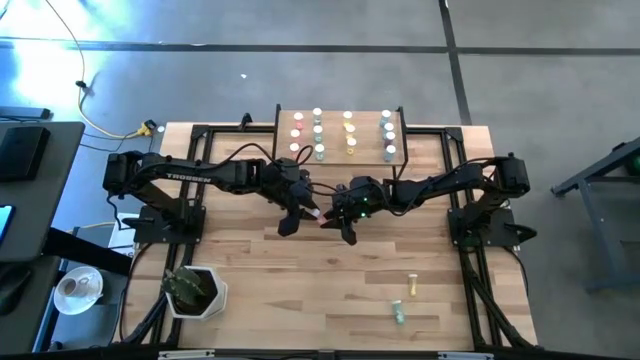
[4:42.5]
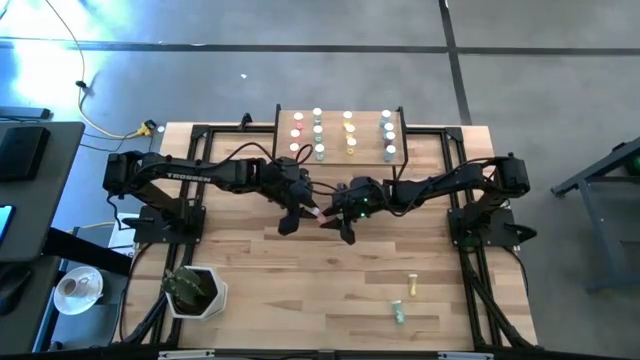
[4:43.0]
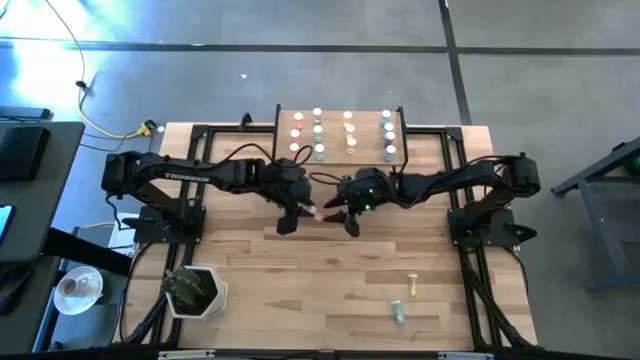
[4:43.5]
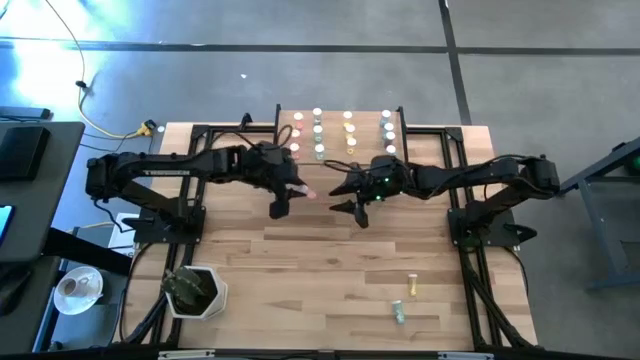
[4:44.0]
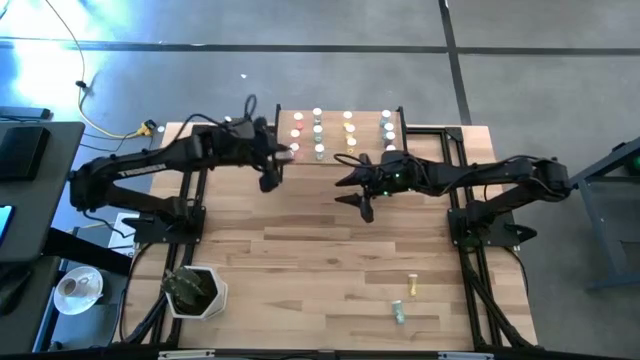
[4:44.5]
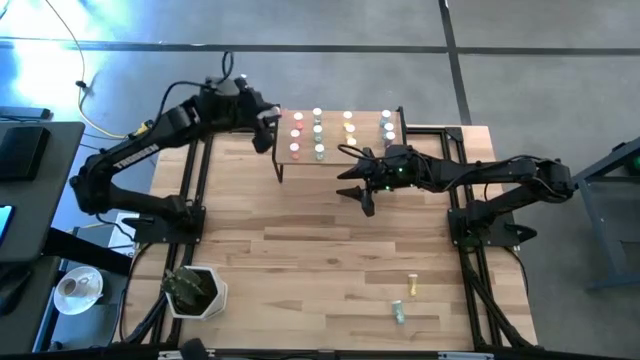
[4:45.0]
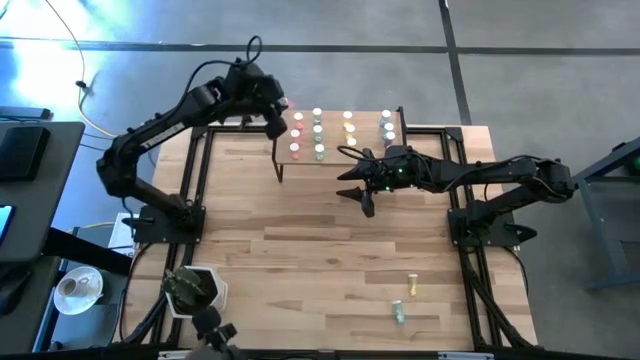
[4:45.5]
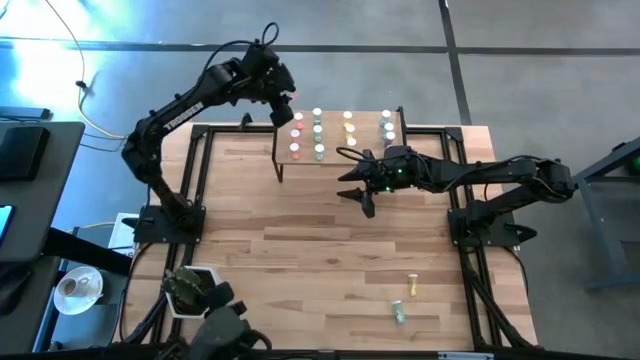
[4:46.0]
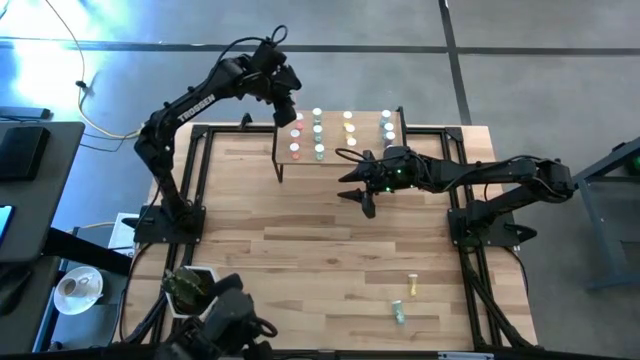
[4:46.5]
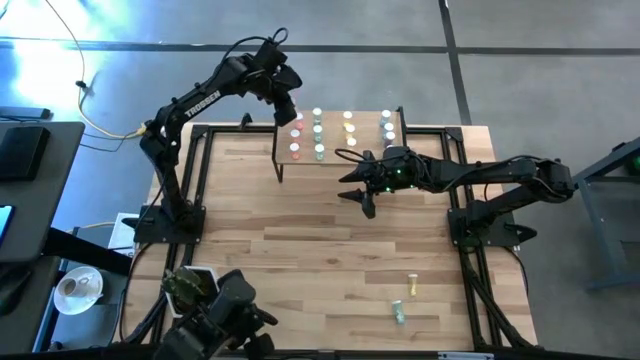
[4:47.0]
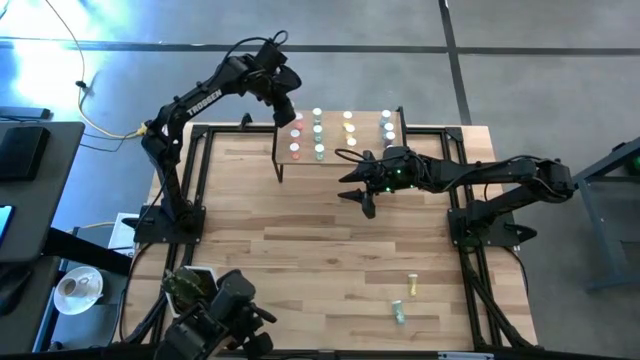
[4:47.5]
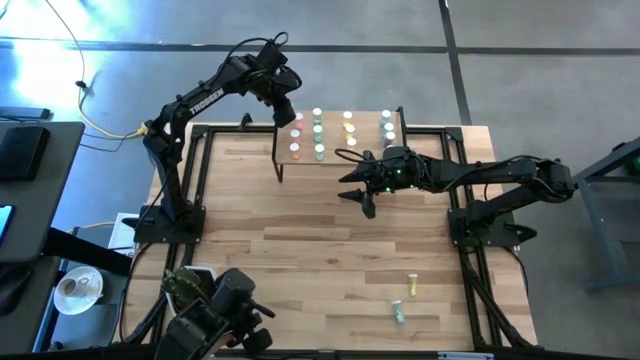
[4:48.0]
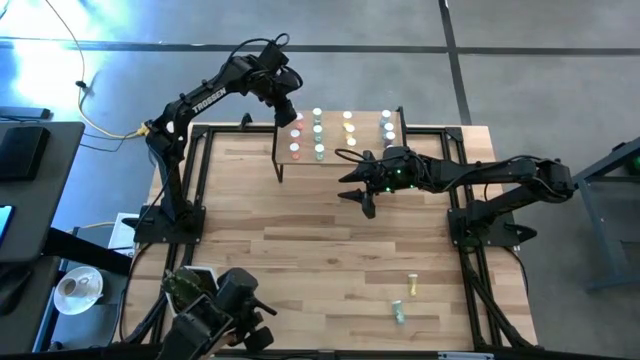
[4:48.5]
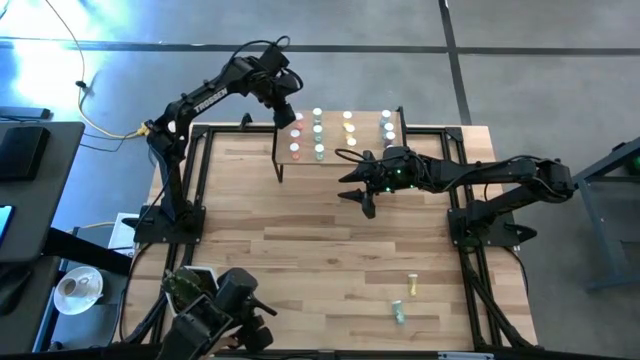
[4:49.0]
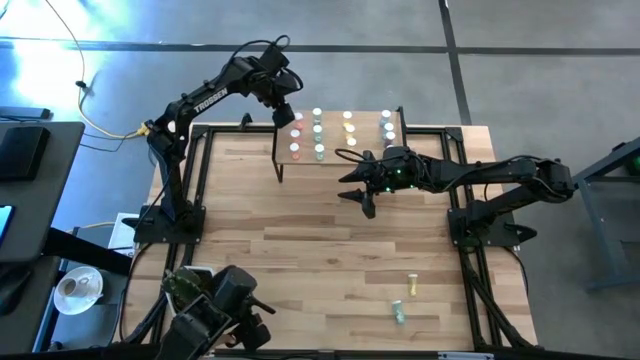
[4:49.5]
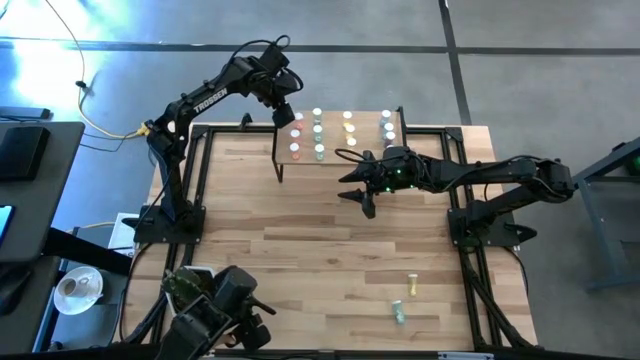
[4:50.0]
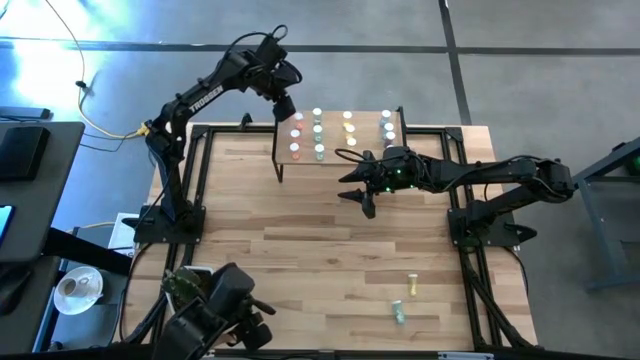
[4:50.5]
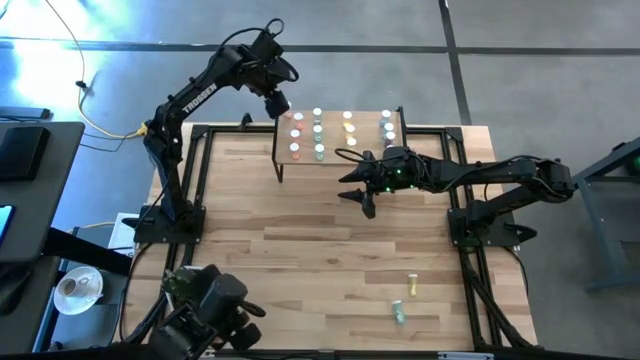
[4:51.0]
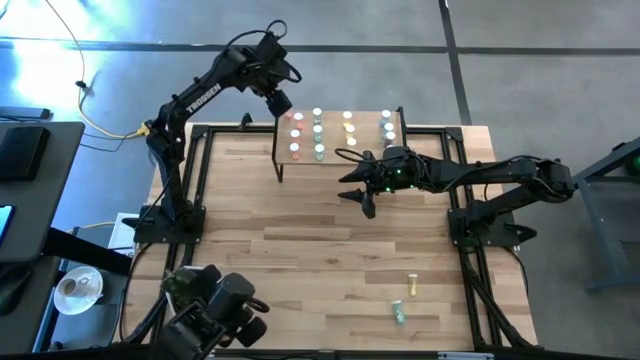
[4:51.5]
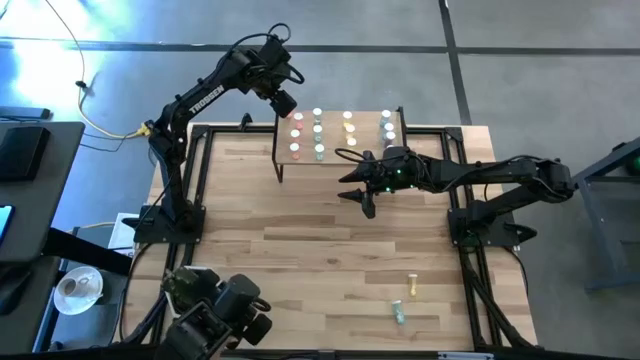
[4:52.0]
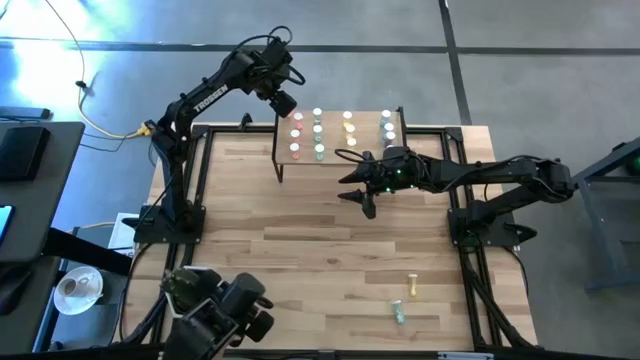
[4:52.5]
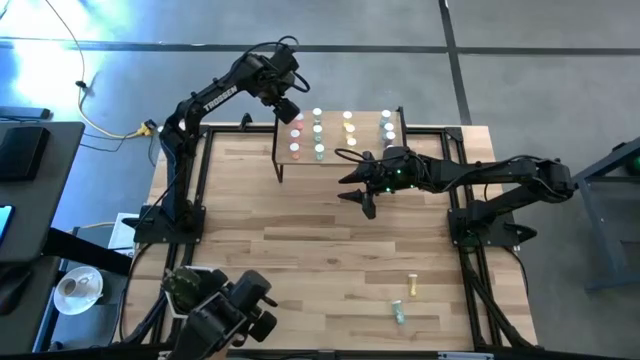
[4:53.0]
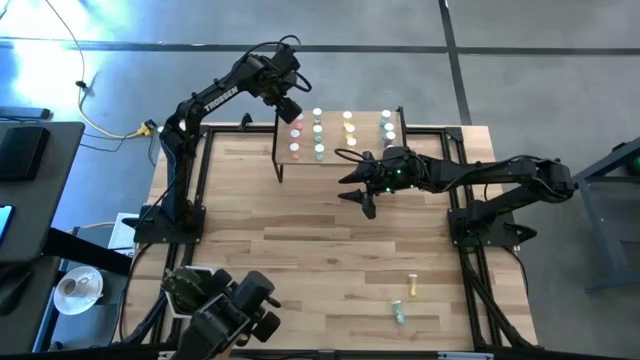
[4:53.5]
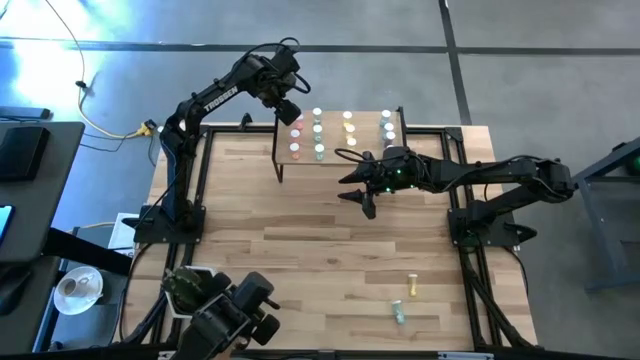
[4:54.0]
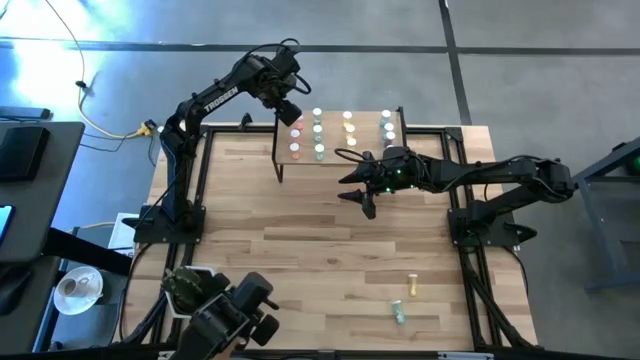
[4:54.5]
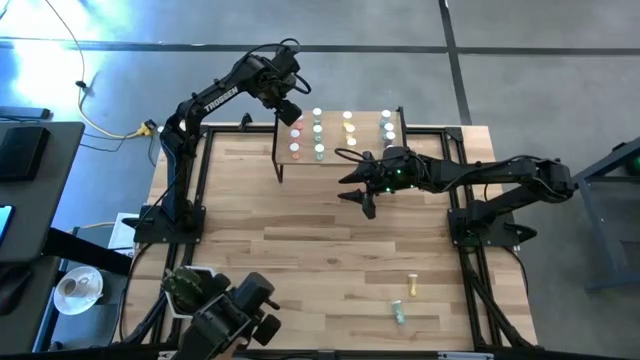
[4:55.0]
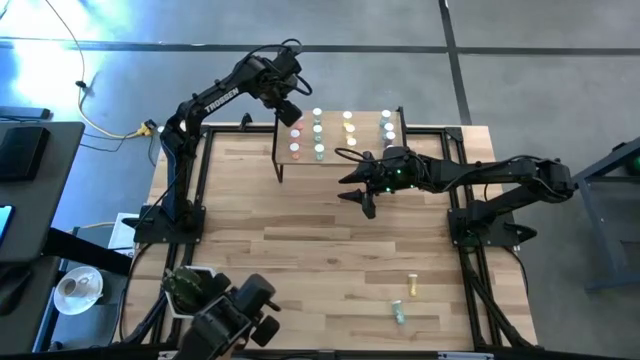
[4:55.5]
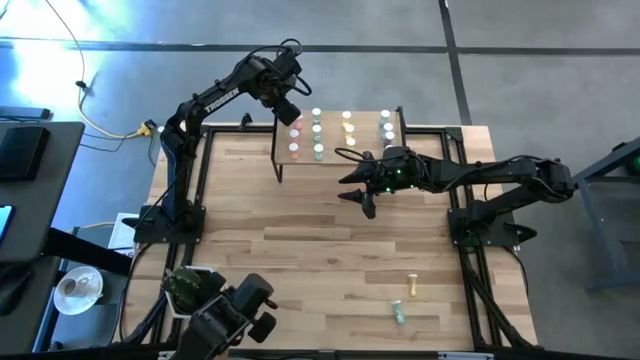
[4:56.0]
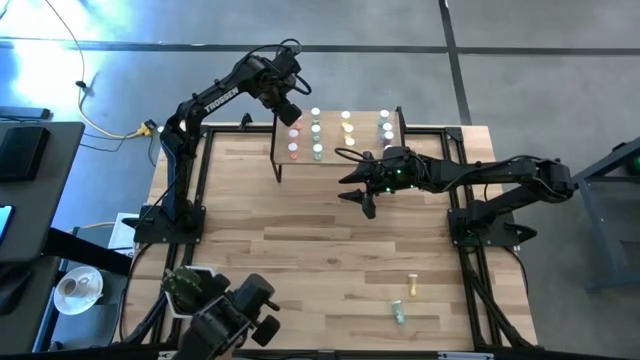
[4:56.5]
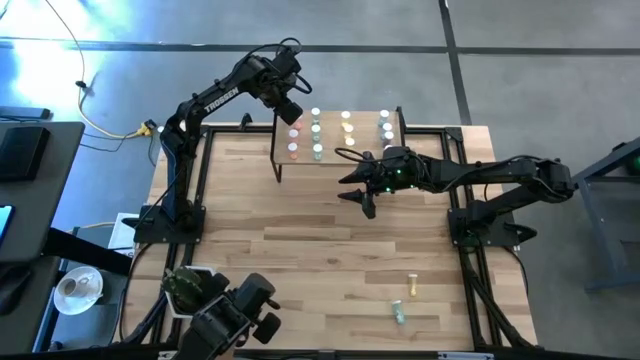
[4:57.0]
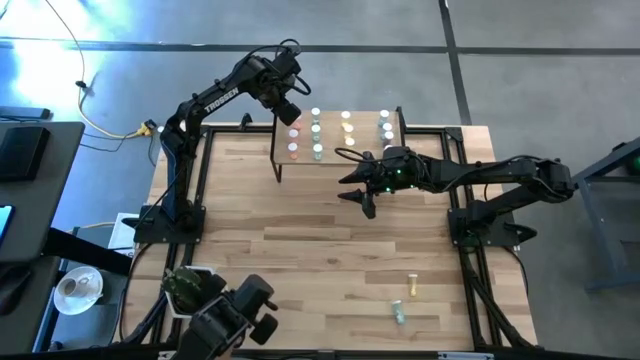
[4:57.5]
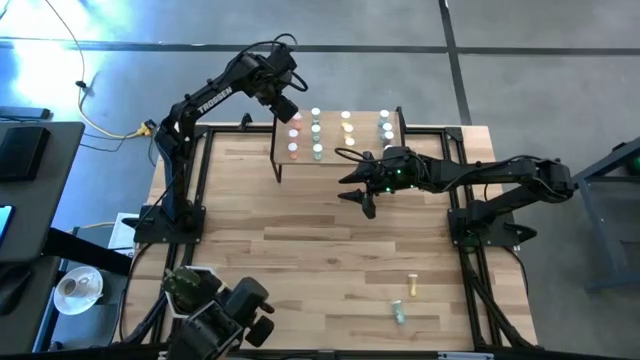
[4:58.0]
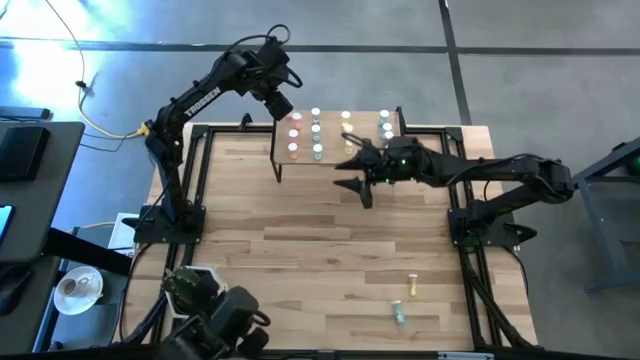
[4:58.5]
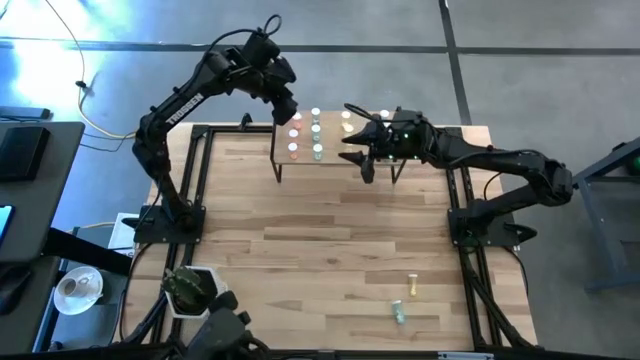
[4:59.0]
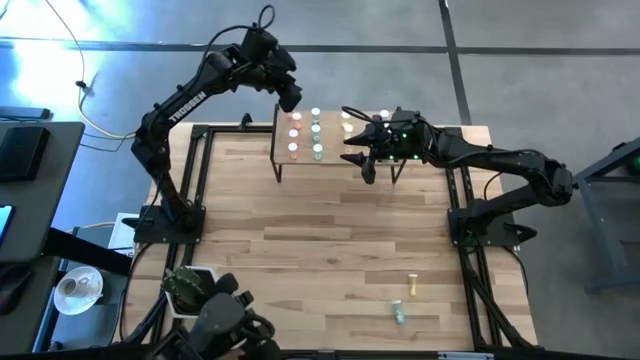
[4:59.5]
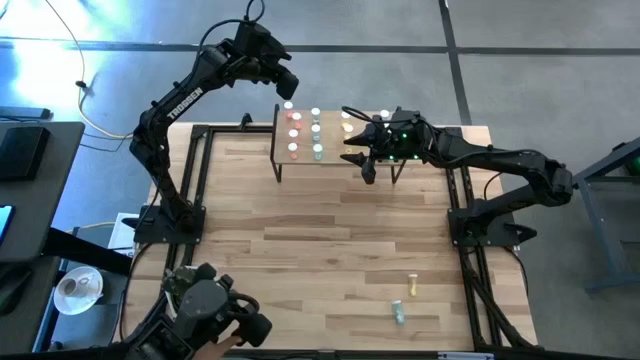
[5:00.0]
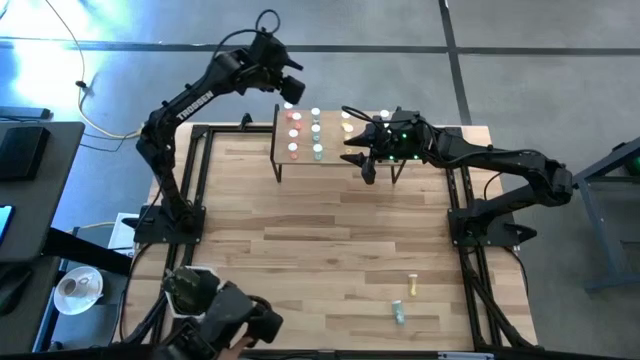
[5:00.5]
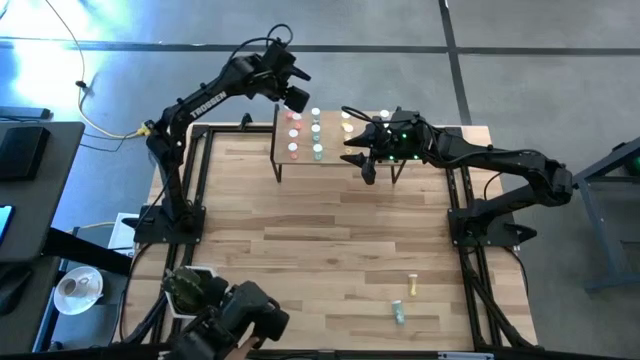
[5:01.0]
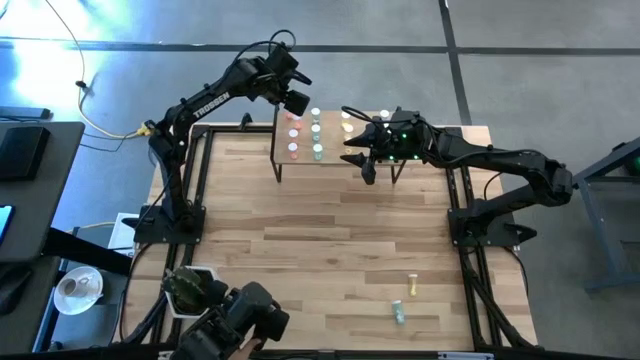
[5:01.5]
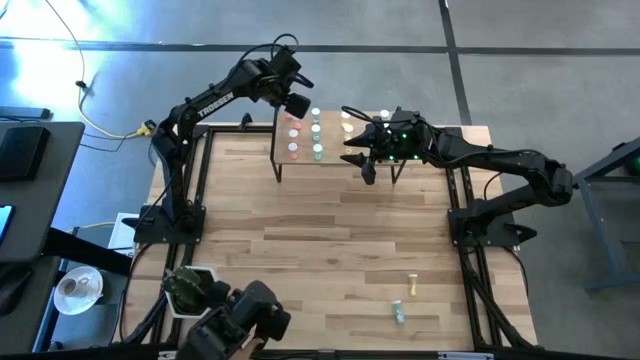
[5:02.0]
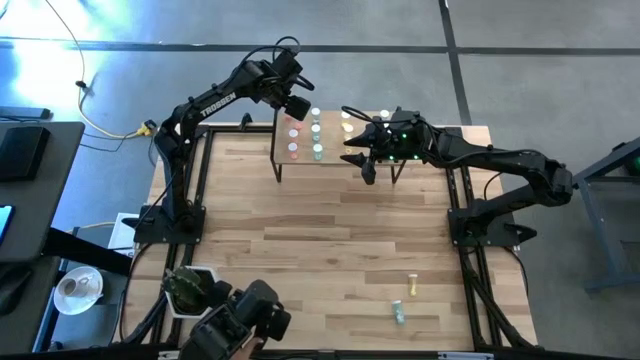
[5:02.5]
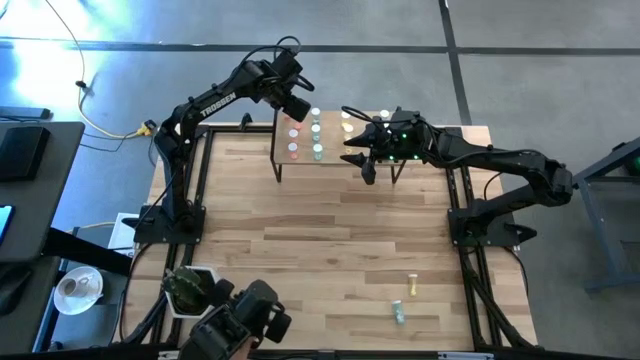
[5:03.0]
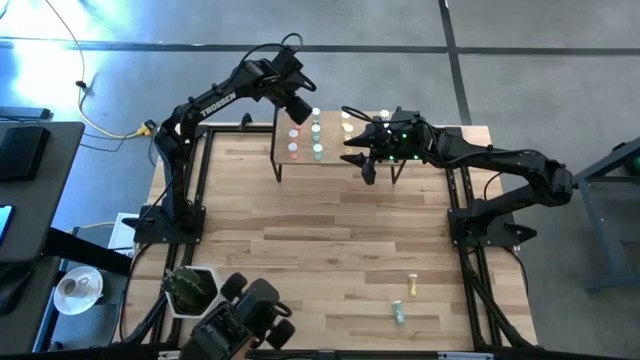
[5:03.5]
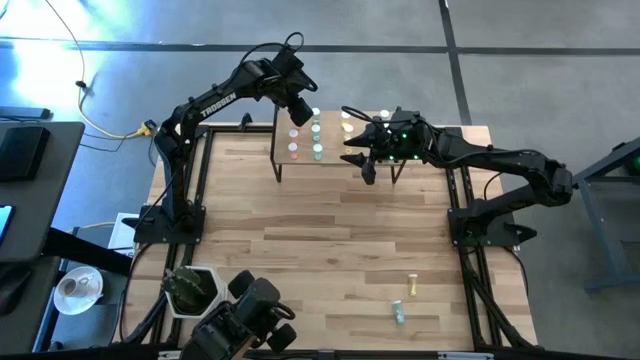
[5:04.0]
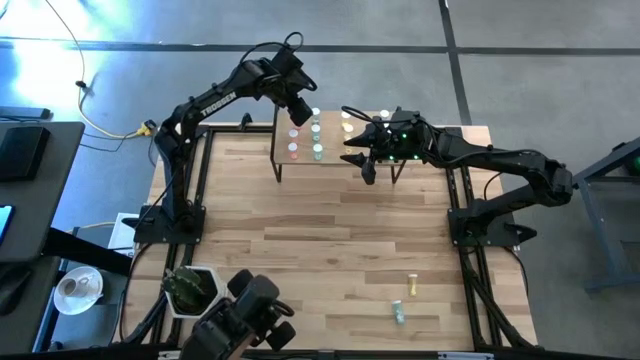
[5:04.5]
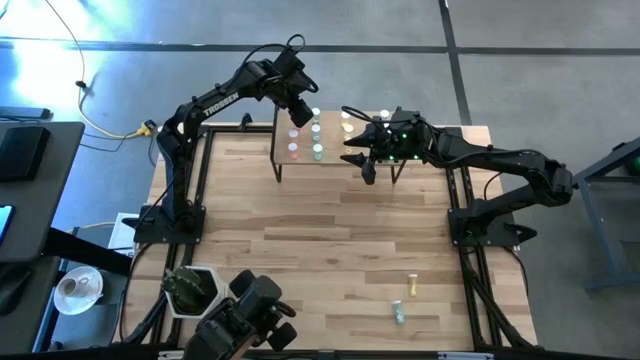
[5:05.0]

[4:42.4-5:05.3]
Task: Pick and place medicine bottles onto shelf by color
Put the red medicine bottle on the shelf
